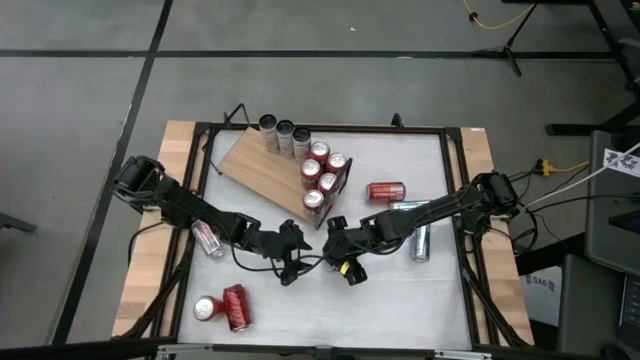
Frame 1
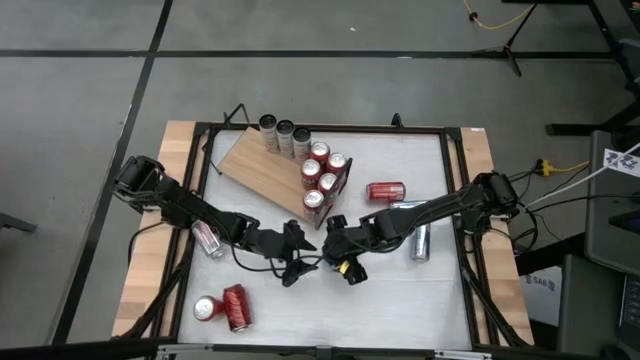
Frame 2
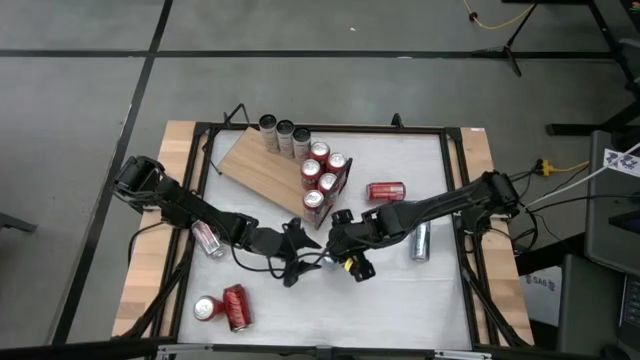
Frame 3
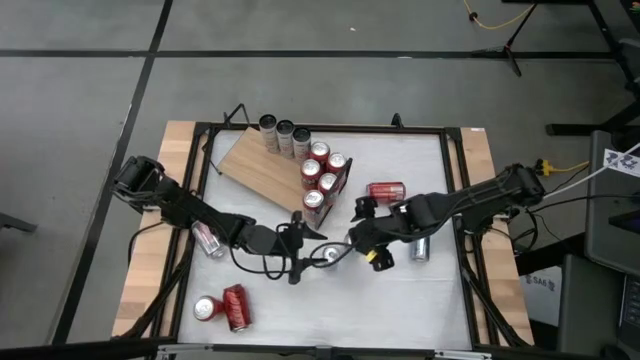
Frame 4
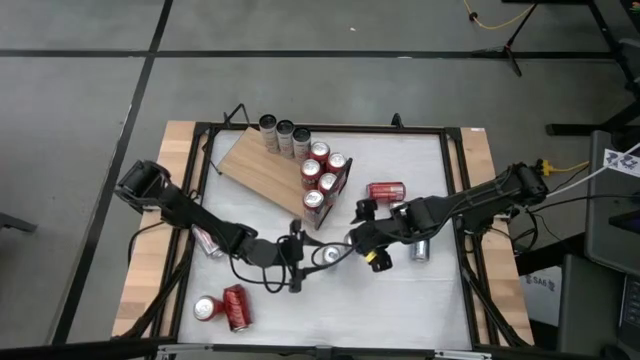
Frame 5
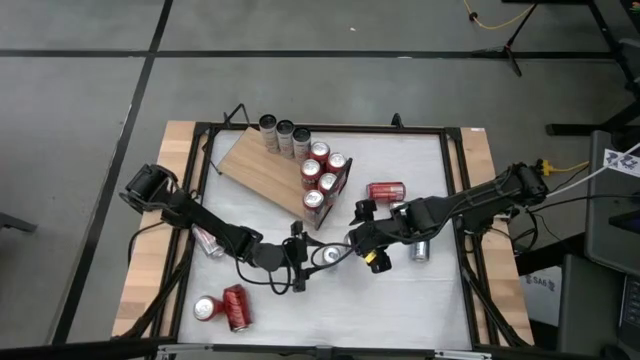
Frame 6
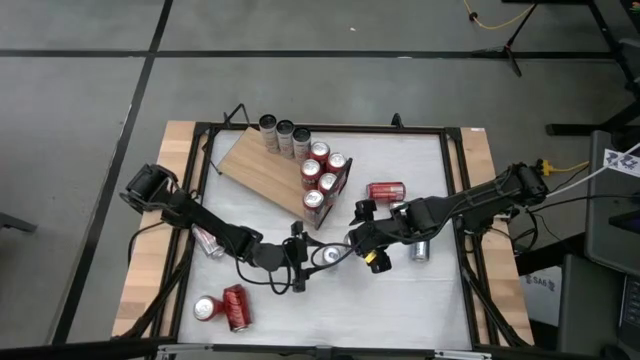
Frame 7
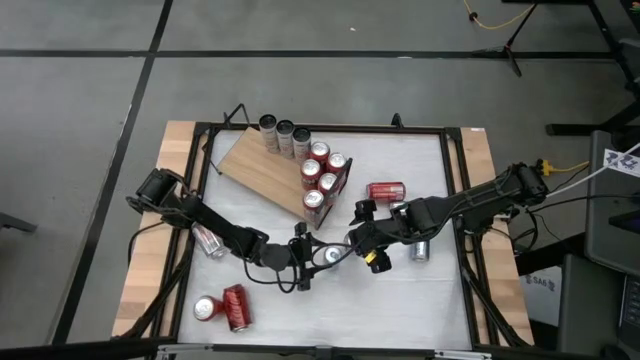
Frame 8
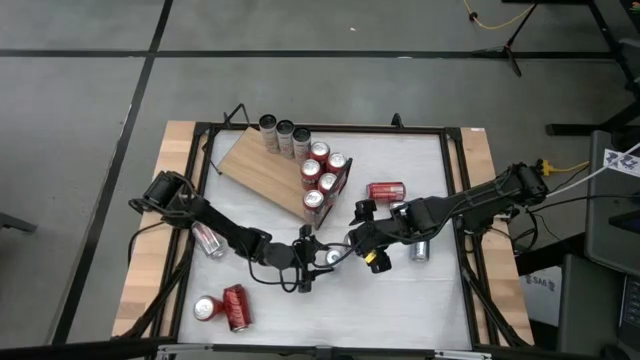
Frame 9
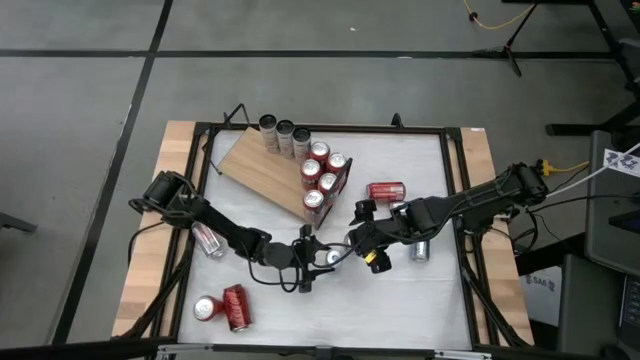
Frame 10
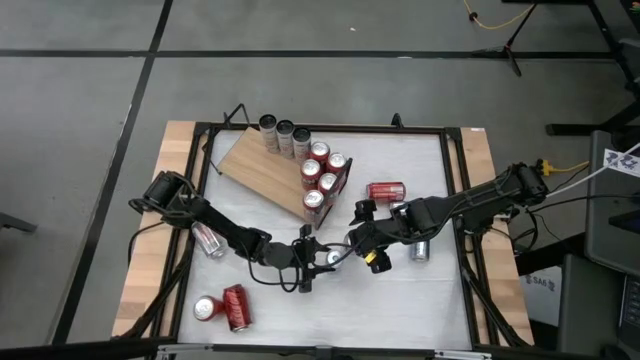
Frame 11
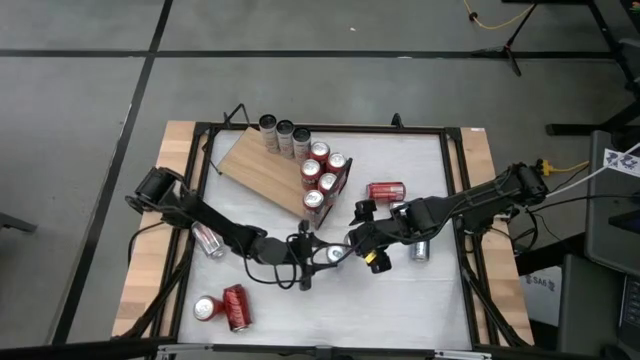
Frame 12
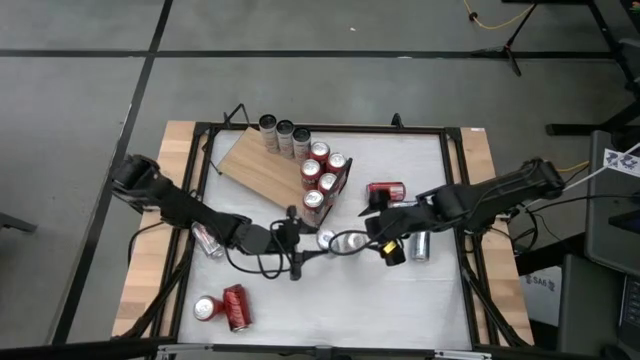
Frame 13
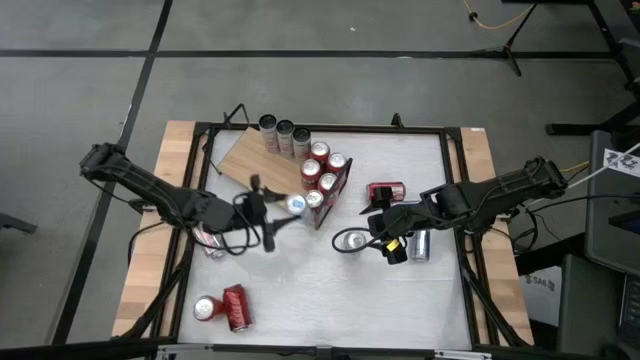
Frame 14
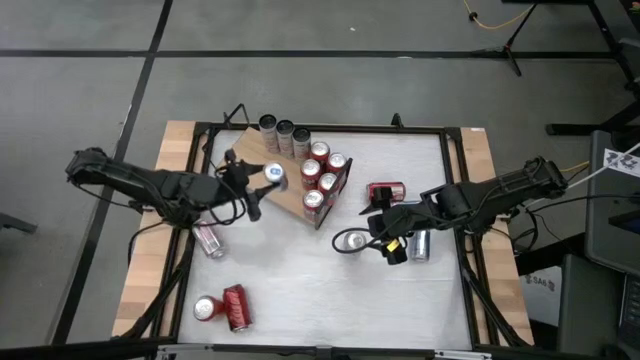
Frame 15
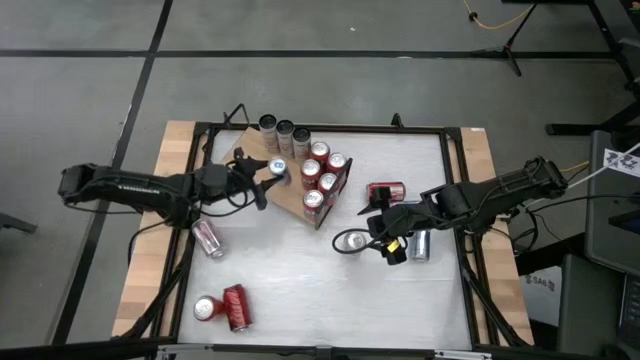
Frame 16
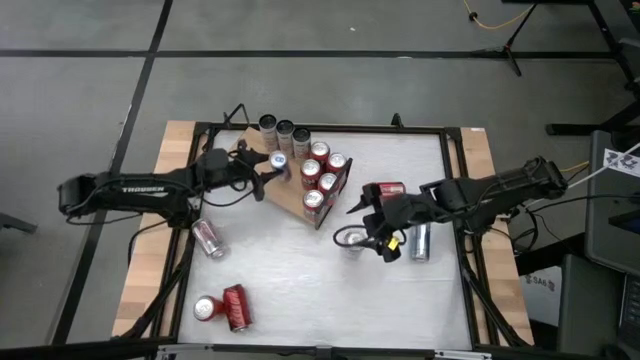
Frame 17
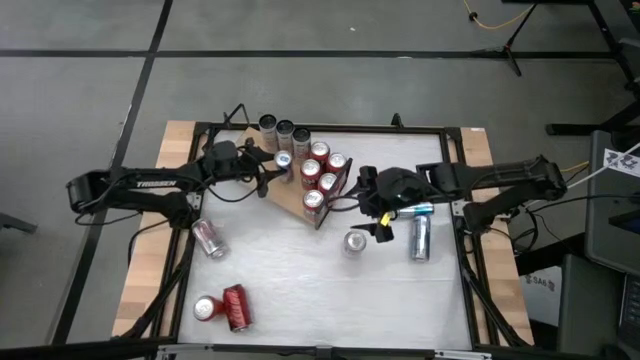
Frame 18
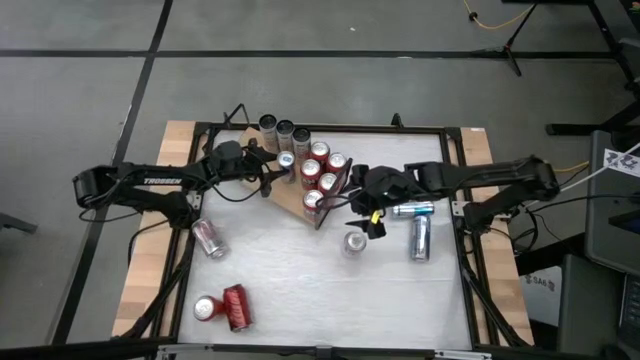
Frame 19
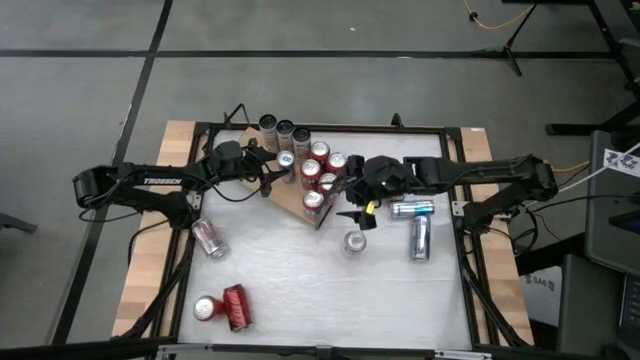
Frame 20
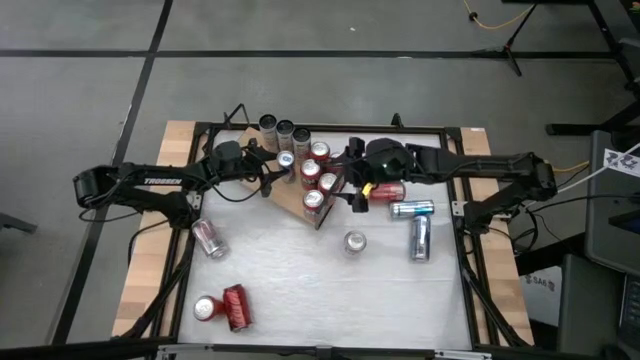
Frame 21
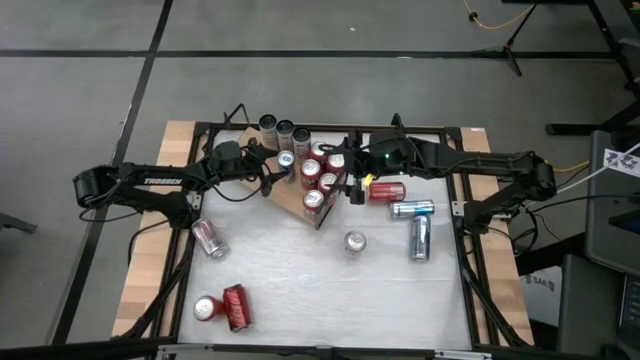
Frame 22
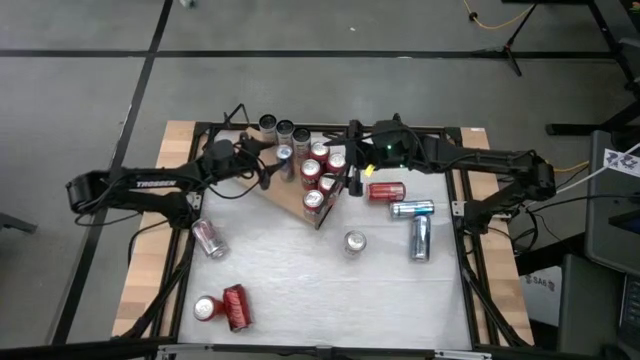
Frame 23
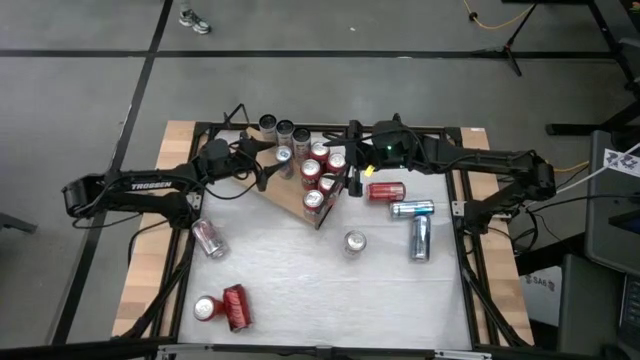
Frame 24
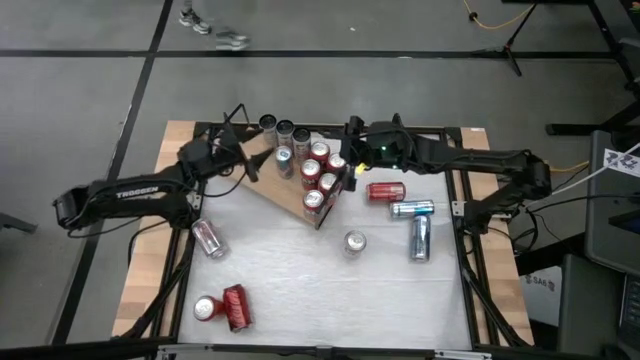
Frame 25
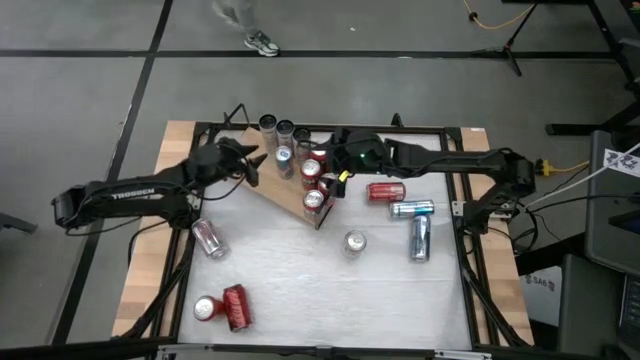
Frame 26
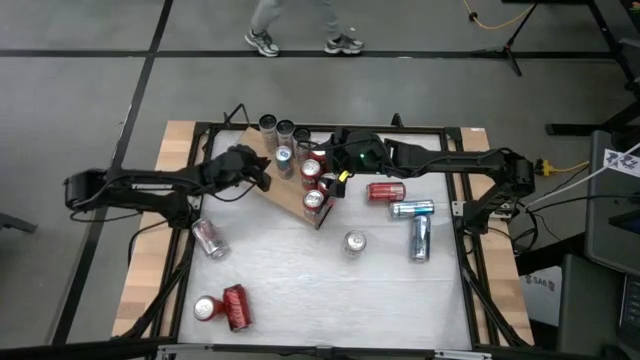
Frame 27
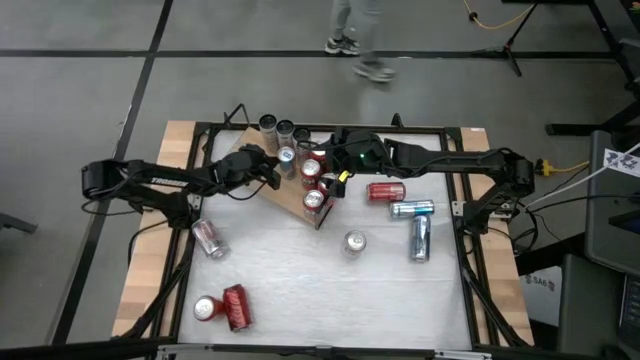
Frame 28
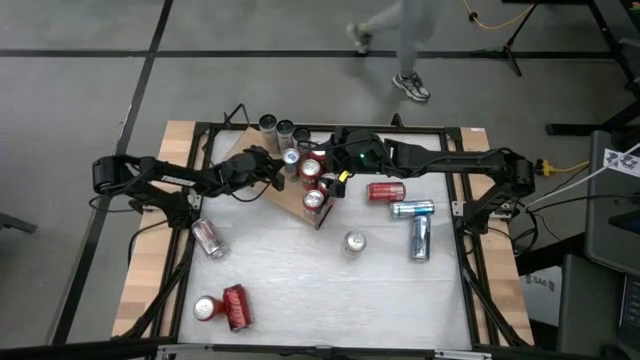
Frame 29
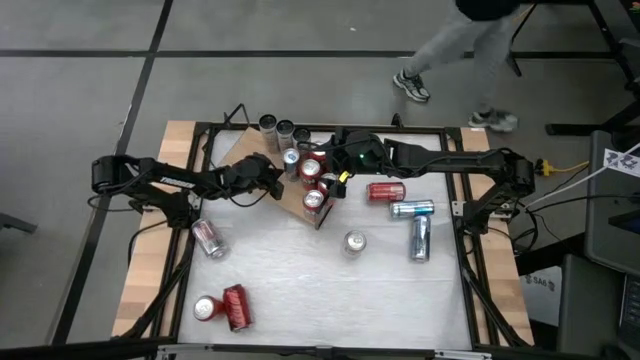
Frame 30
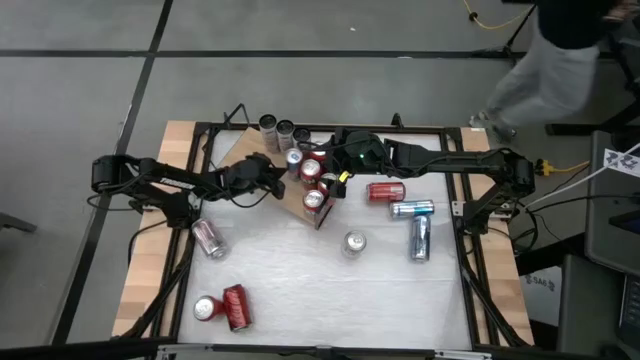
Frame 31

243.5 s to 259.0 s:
Task: Pick and place cans onto a shelf
Put the bottom left blue/white soda can on the shelf

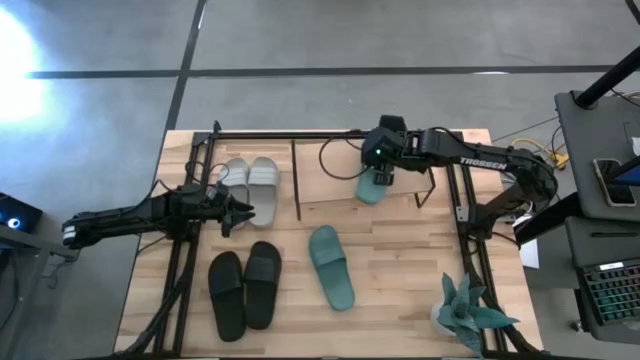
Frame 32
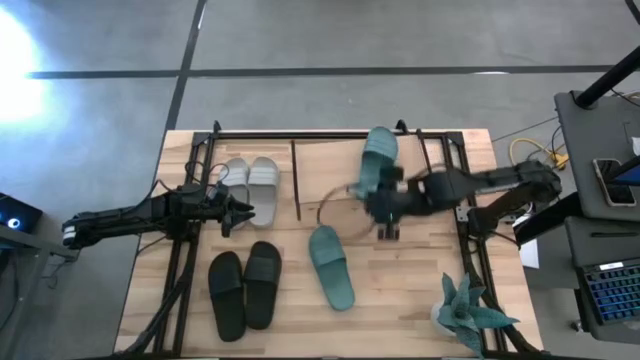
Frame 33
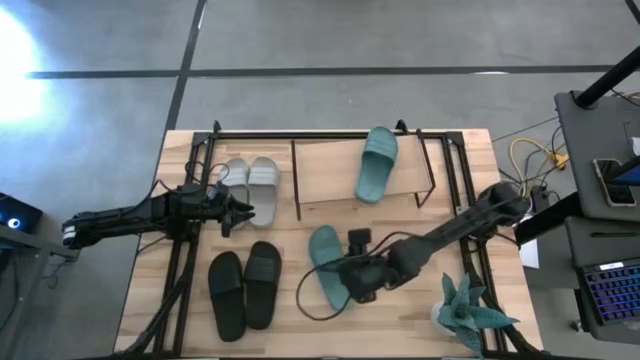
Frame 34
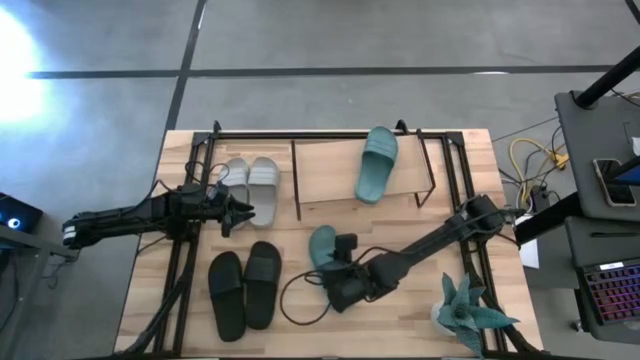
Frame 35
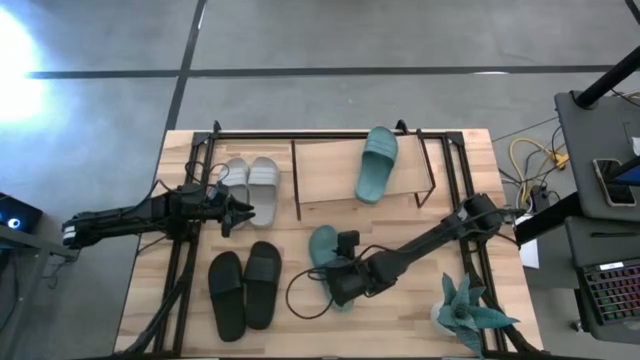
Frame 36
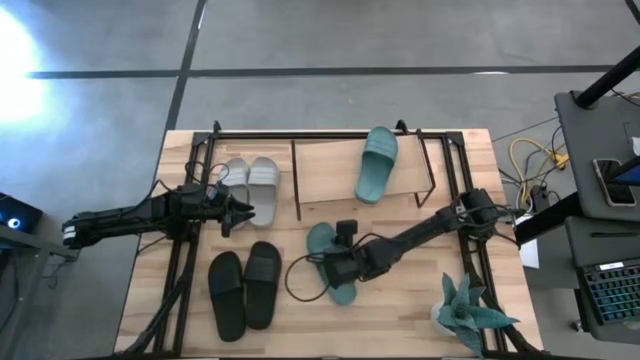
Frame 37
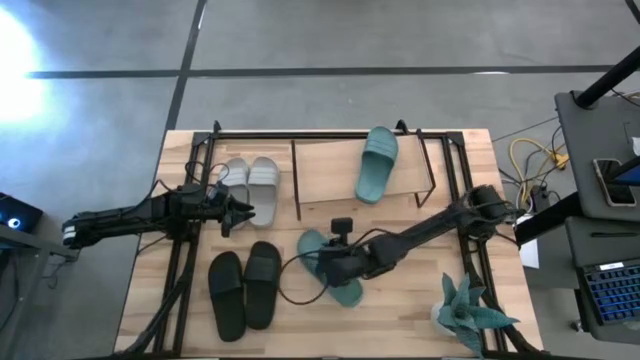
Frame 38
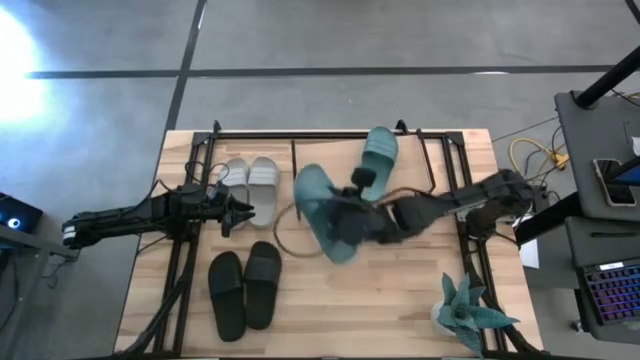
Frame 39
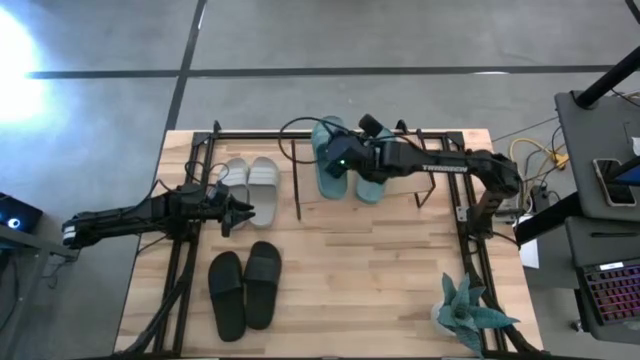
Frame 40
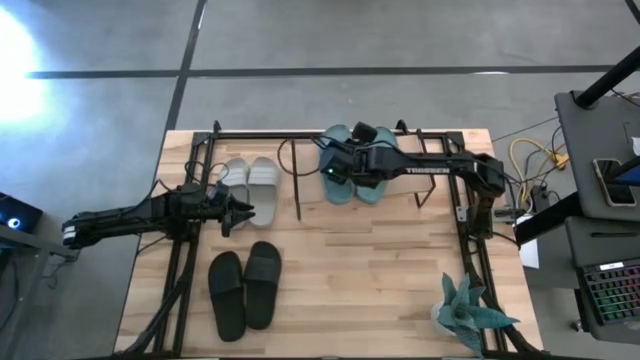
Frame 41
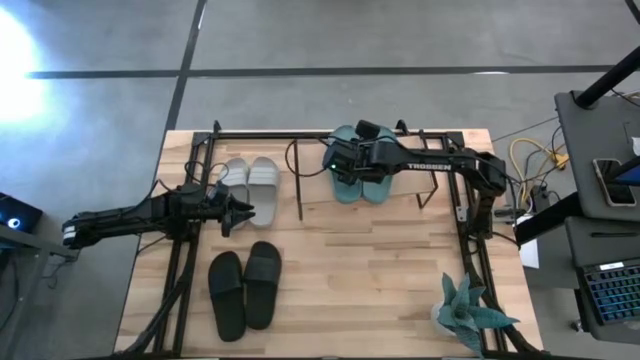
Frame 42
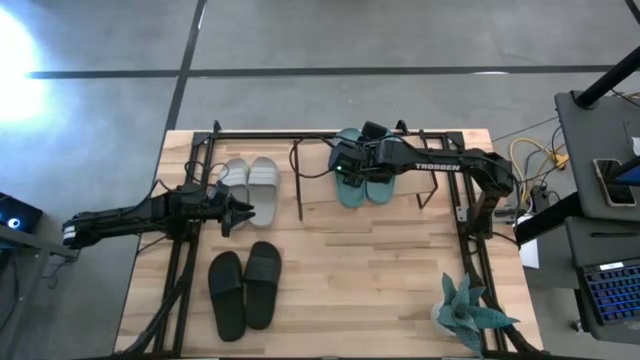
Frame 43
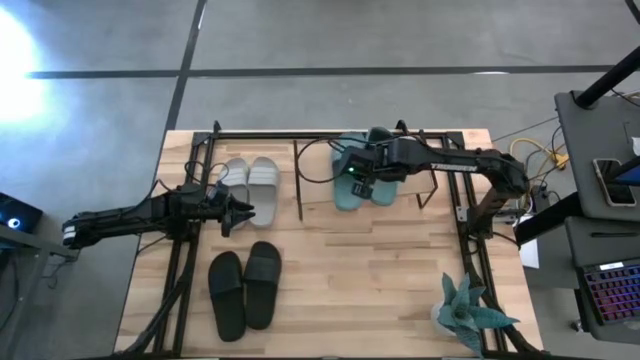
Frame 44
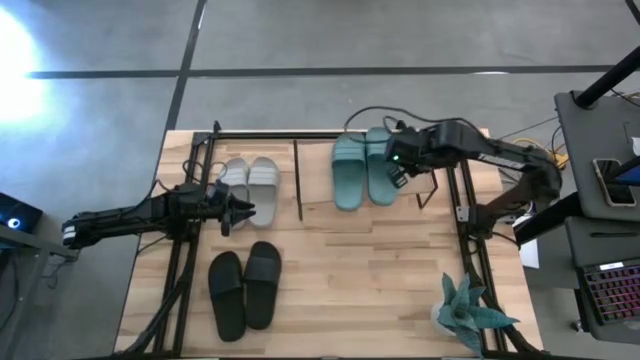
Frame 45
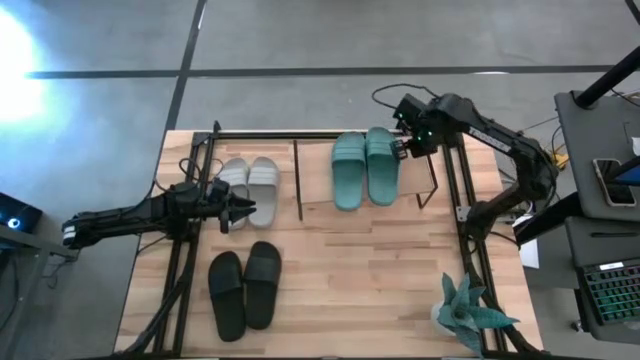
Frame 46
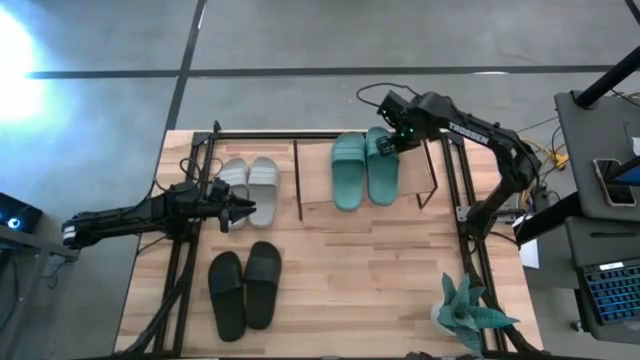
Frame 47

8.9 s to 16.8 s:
Task: Pick and place slides into the shelf
Put the green slide on the shelf
